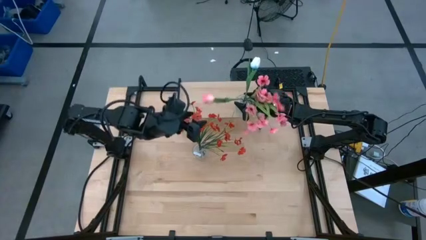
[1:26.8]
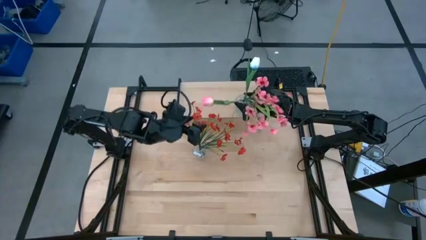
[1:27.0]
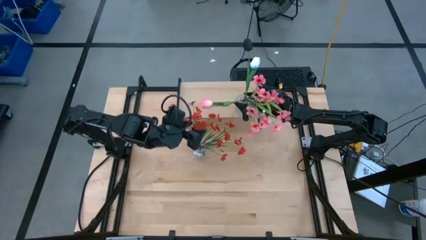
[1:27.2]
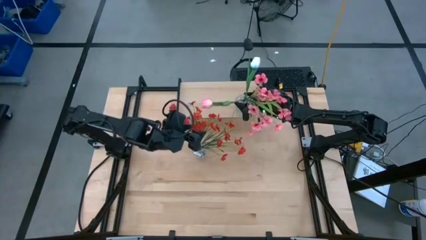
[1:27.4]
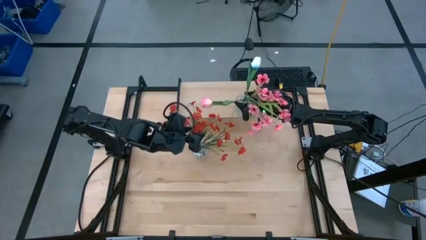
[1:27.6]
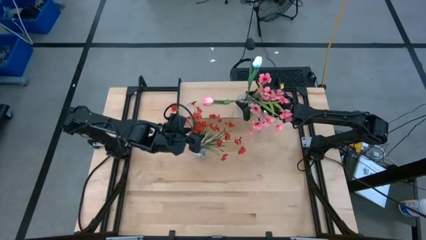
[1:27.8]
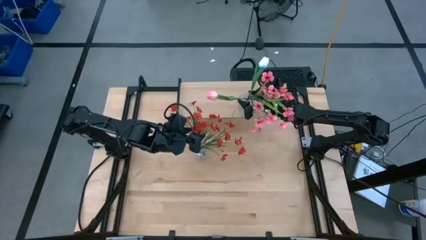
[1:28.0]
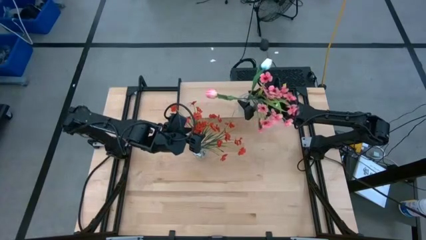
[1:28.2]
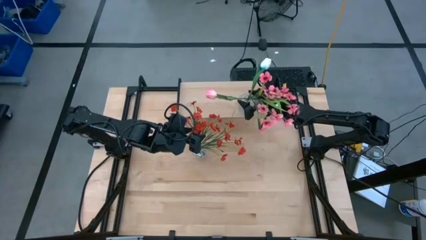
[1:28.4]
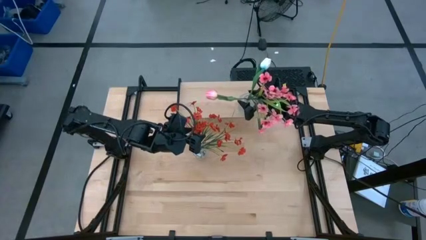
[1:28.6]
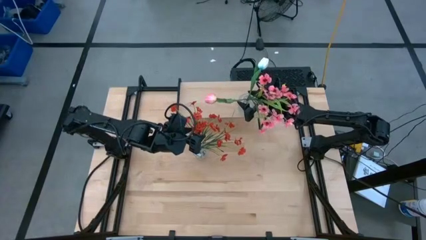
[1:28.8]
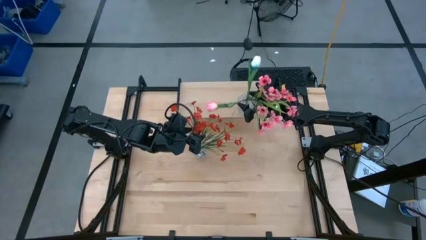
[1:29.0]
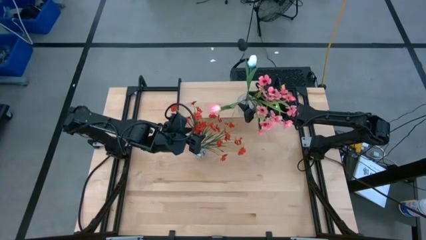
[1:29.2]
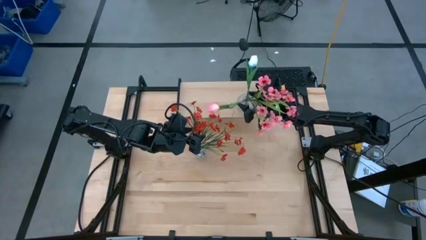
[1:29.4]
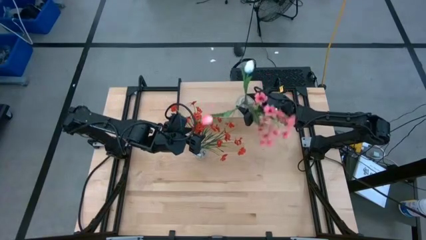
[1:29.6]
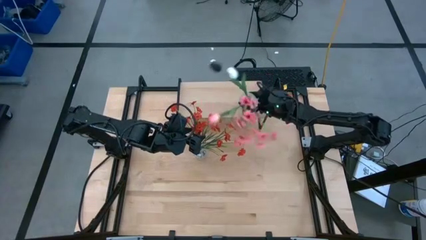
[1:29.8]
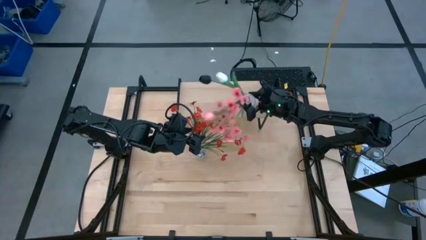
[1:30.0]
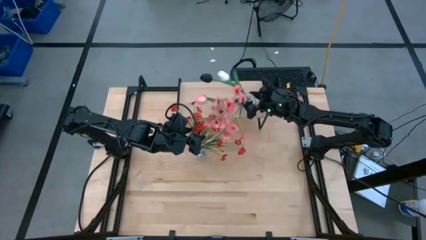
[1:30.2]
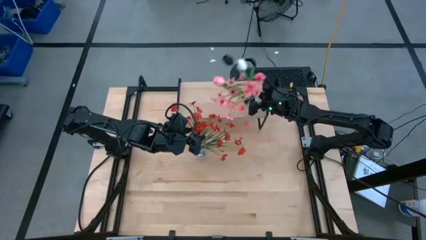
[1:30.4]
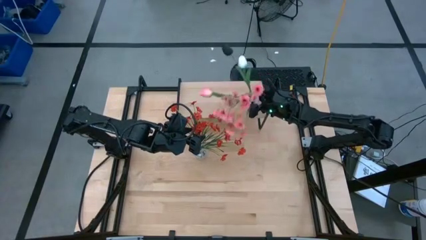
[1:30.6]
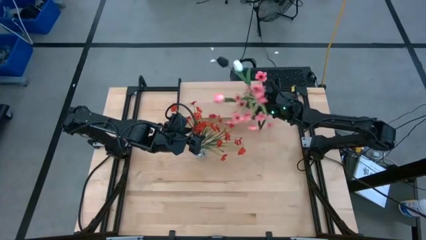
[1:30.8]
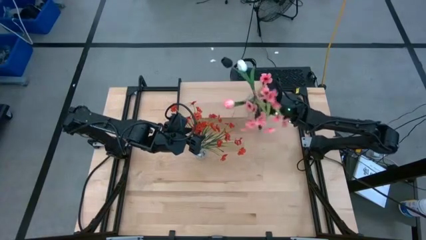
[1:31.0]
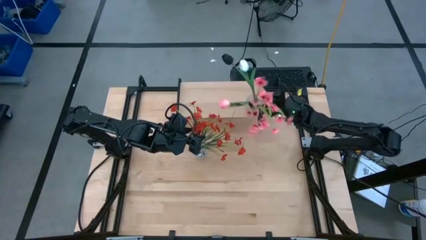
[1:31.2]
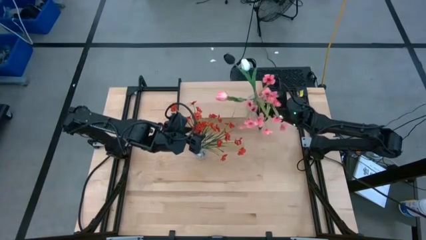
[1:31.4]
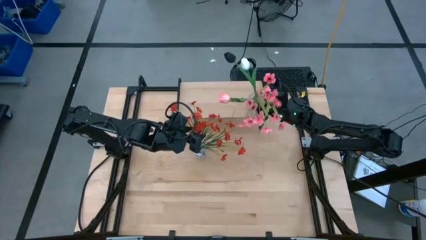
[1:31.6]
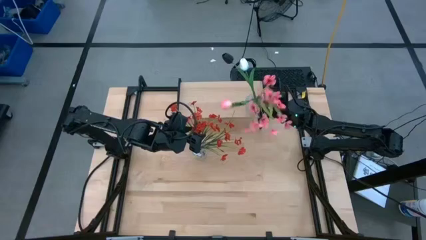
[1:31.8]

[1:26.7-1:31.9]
Task: Pick and place flowers into a vace then onto a shelf
Adjust the transparent vase on the shelf

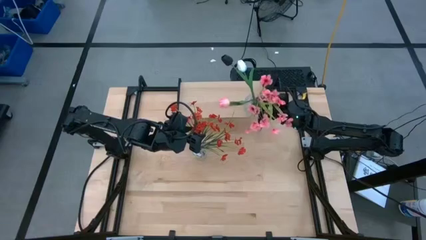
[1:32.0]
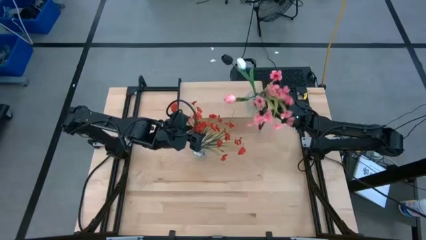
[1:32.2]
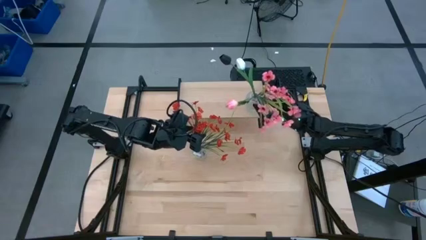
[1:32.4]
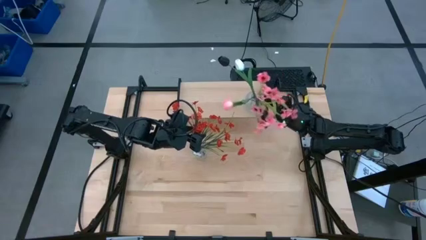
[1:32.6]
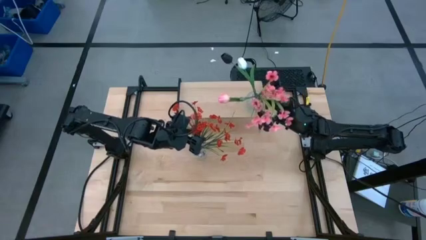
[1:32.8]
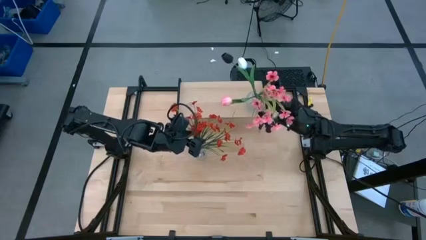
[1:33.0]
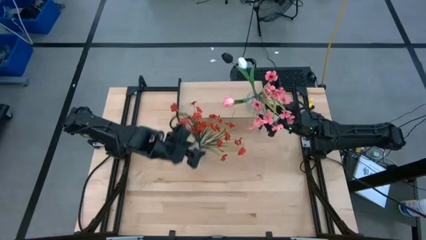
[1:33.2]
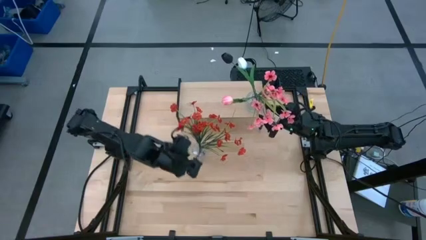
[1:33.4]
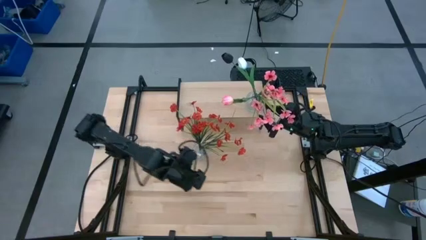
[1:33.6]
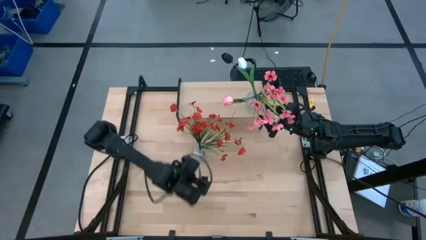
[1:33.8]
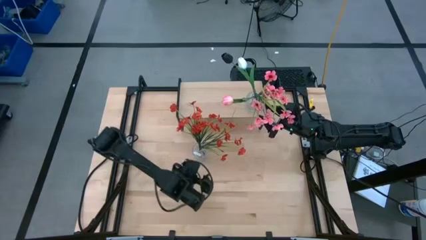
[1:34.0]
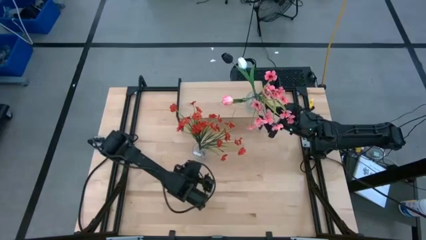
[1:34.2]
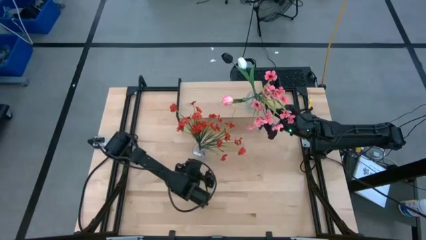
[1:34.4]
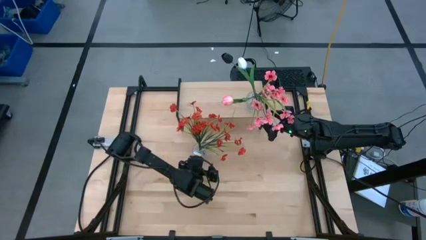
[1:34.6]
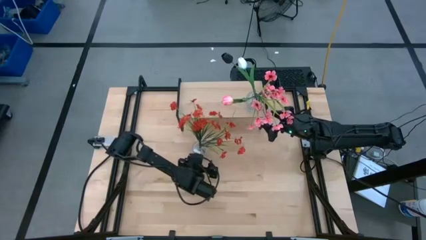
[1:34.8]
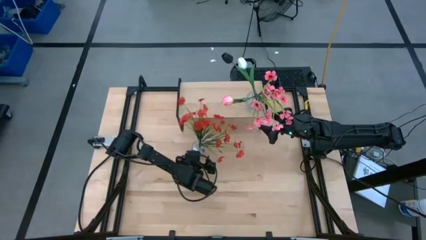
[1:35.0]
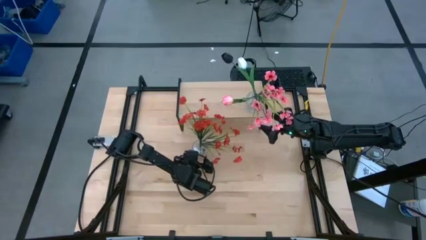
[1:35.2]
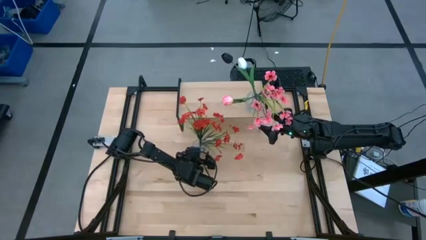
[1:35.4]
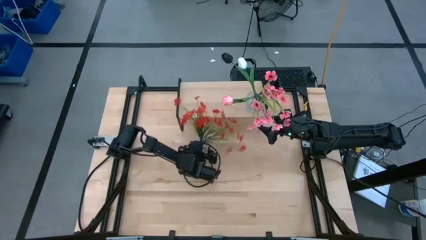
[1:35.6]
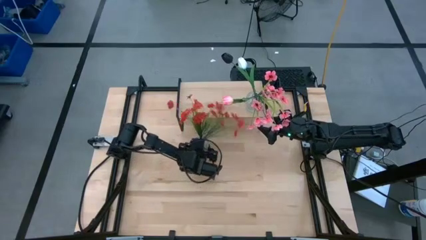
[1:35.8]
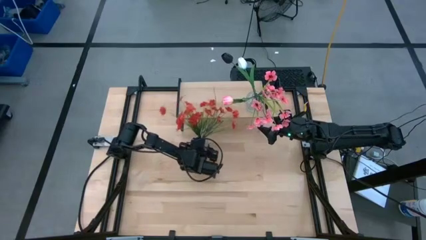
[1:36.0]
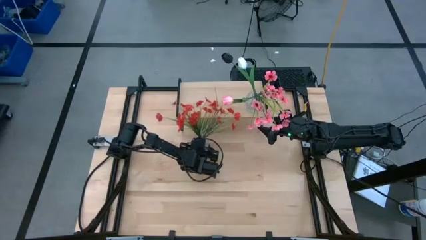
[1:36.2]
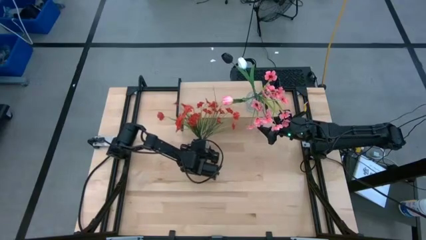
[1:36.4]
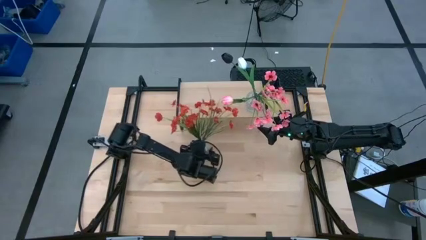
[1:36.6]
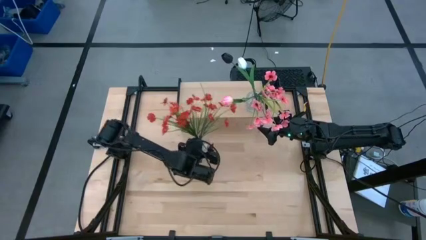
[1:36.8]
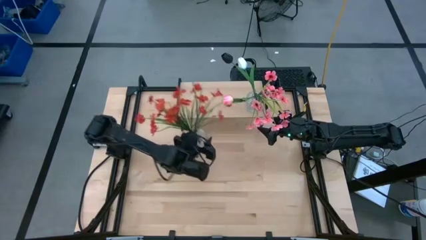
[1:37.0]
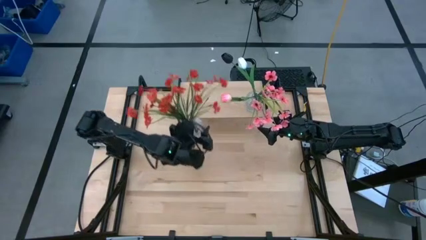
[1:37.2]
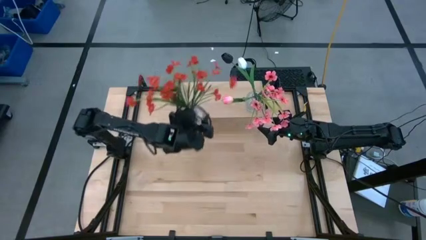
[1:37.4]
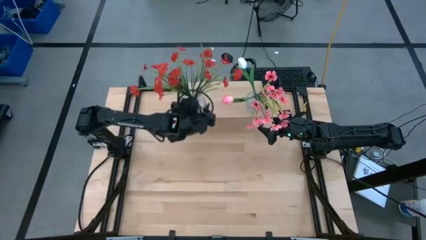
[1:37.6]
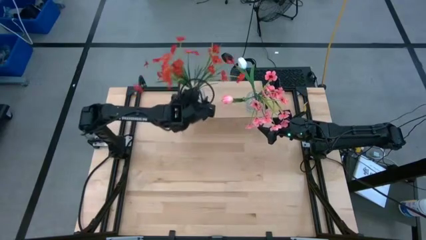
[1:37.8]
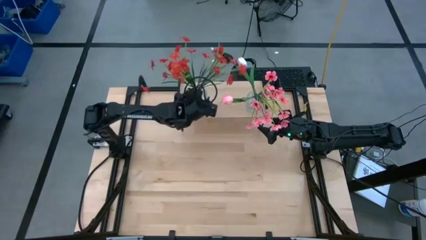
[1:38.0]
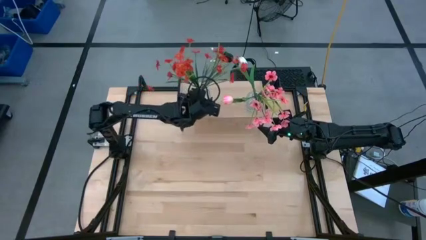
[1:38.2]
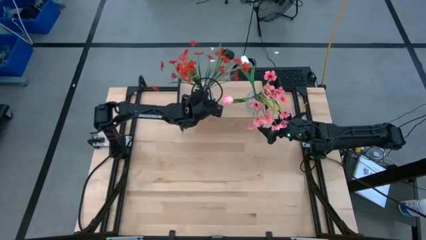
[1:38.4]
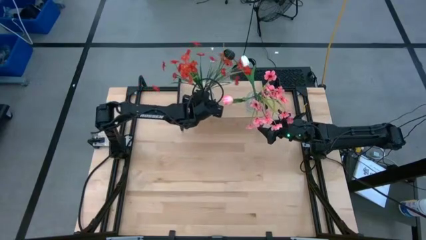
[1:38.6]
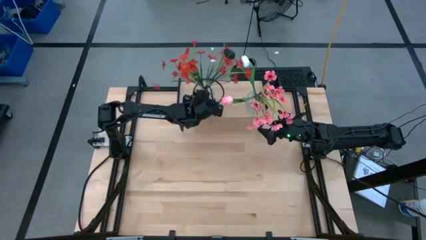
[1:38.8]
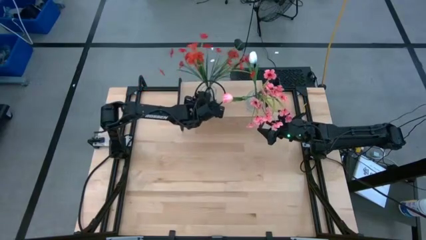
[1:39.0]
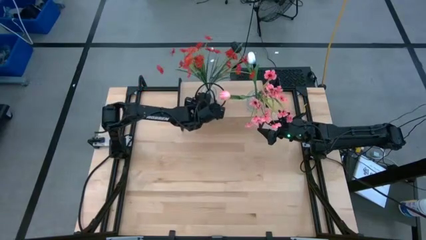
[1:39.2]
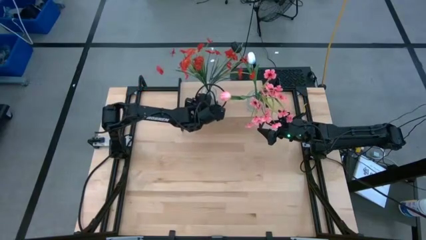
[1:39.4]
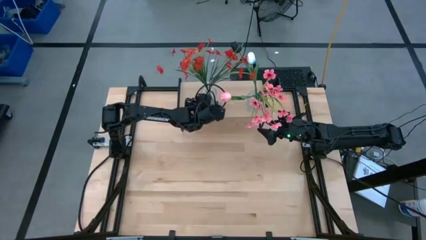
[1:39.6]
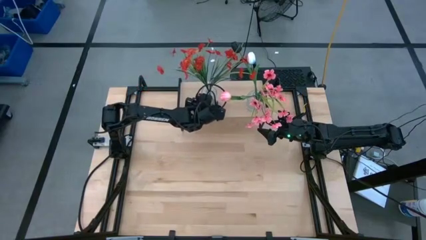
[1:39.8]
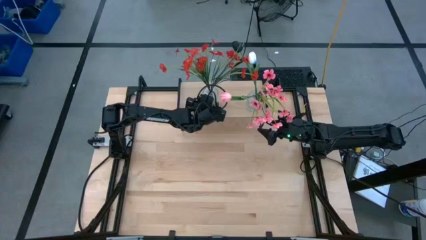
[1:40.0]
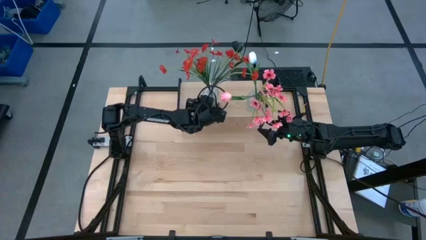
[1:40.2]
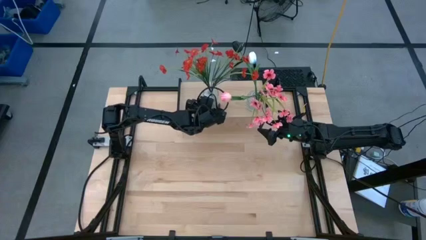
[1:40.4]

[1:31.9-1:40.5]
Put the transparent vase on the shelf
